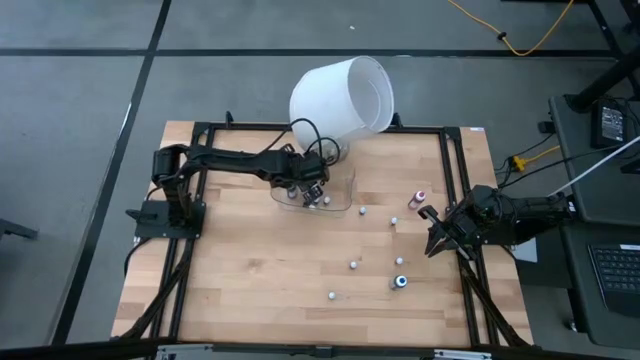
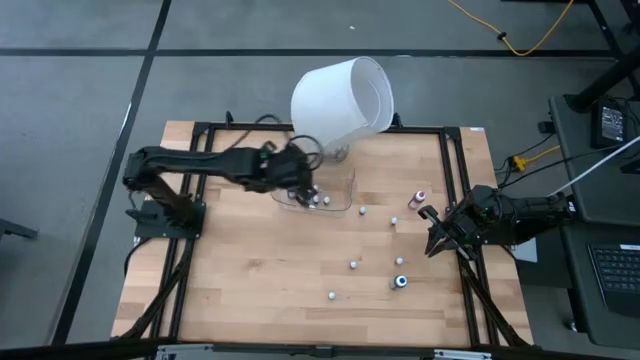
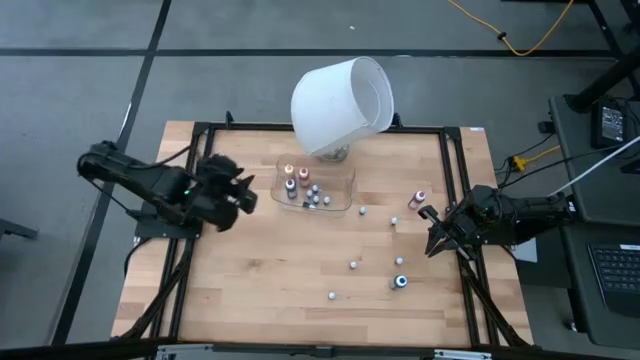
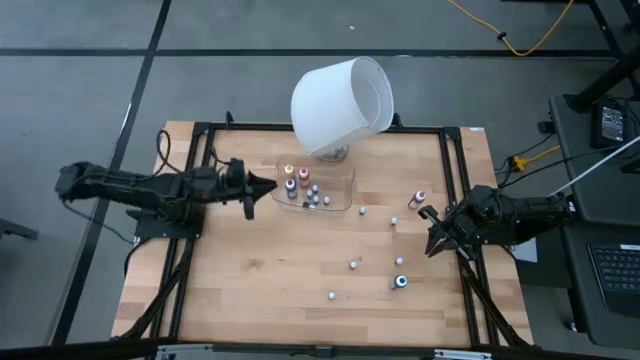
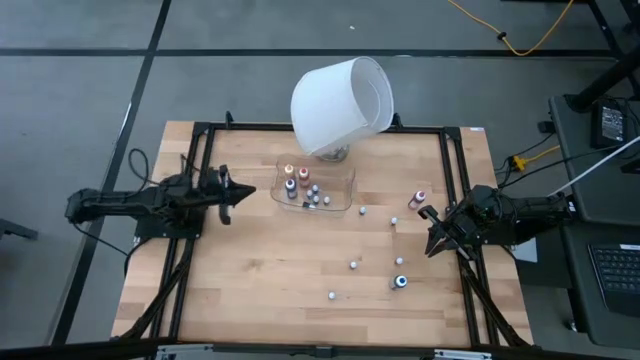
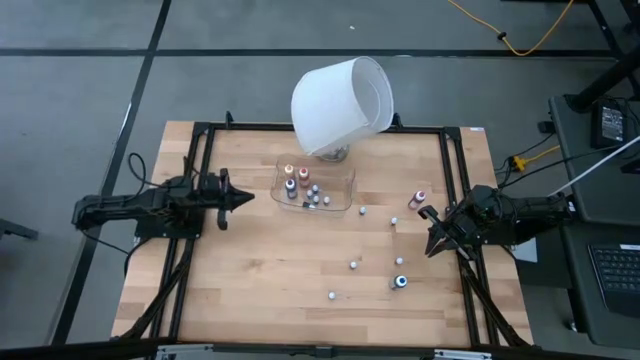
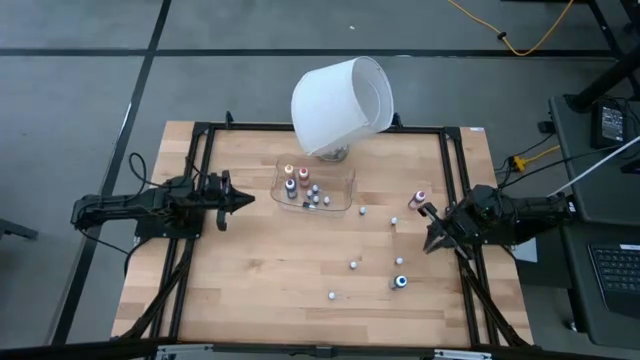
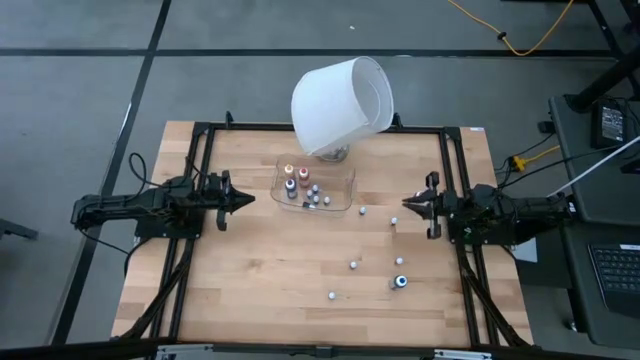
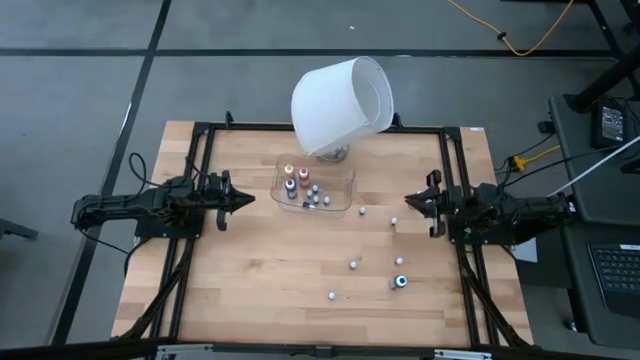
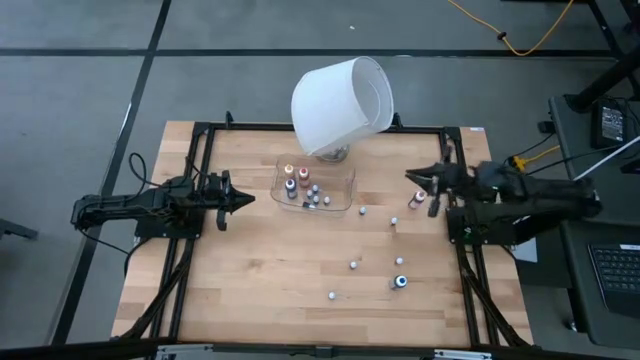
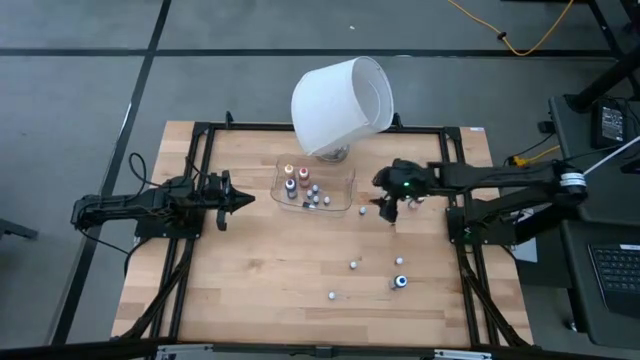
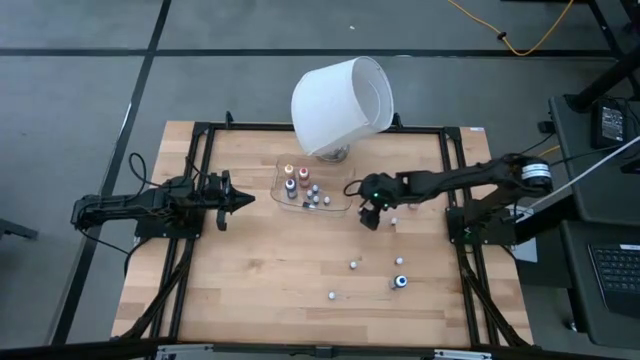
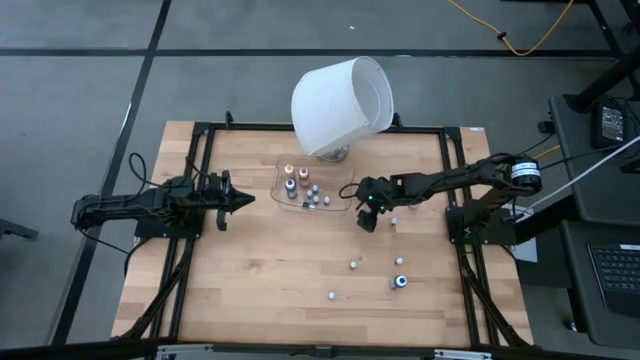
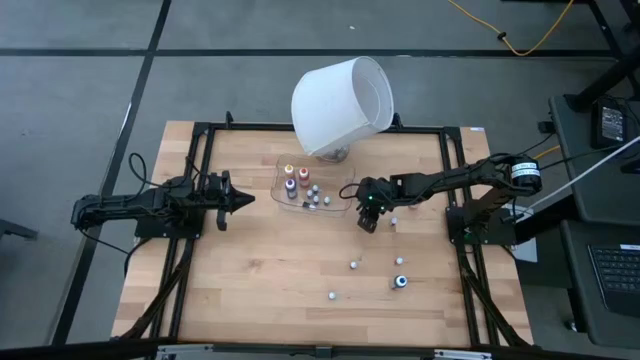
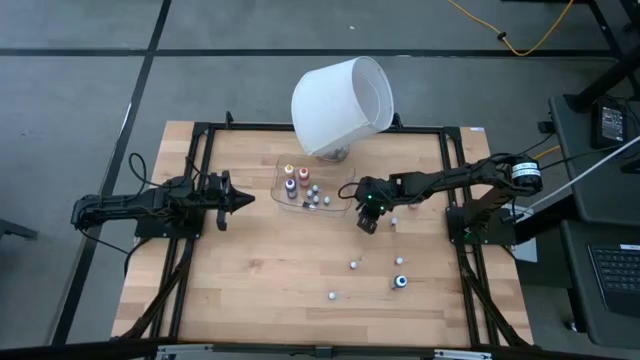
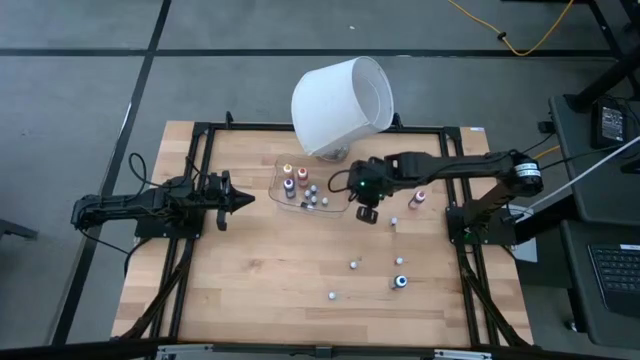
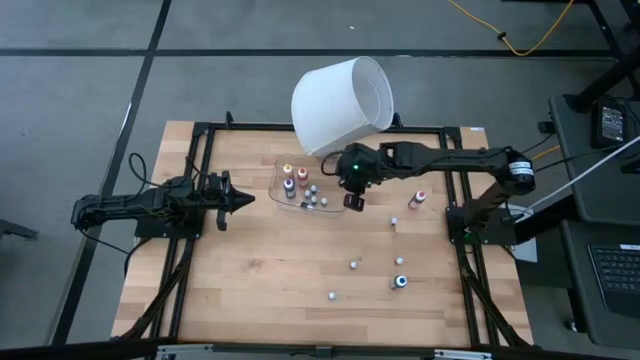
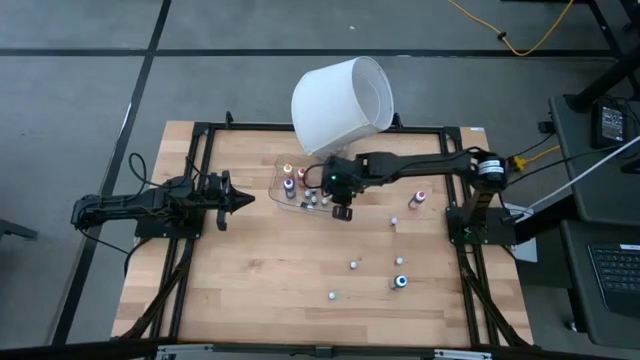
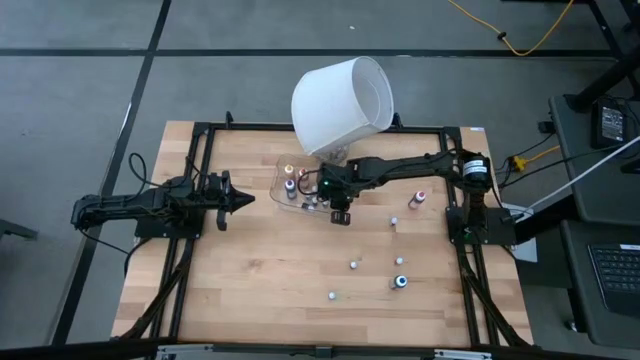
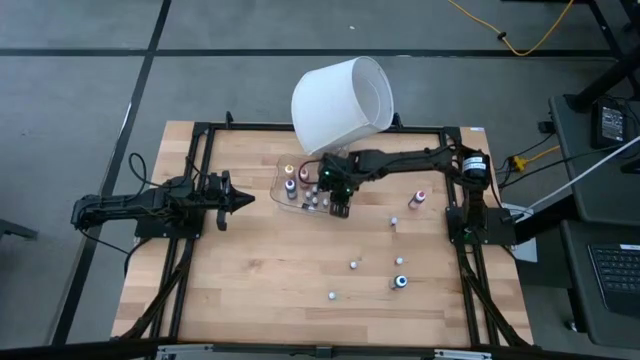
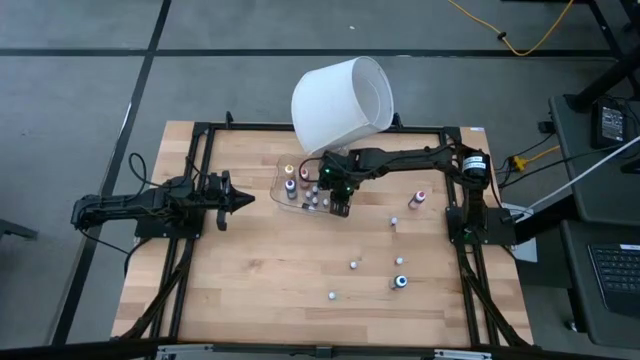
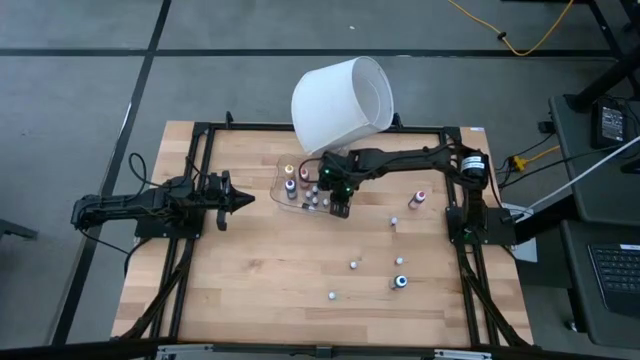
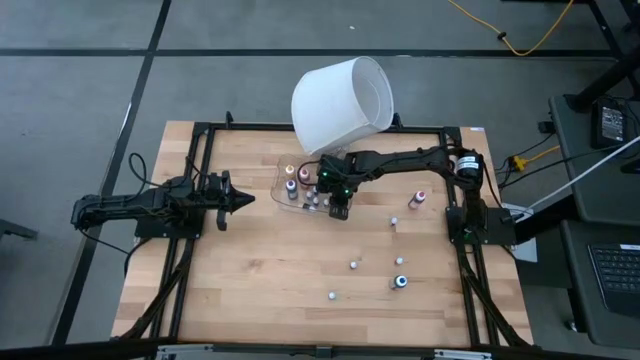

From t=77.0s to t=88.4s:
Task: Pick & Place food coloring
Put the small blue food coloring bottle into the container

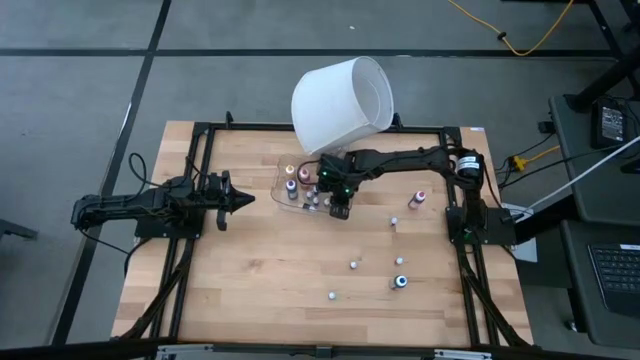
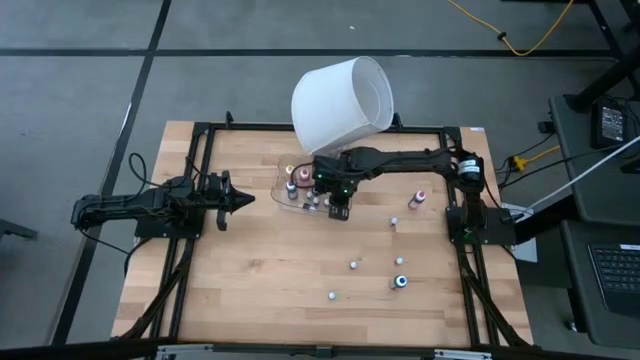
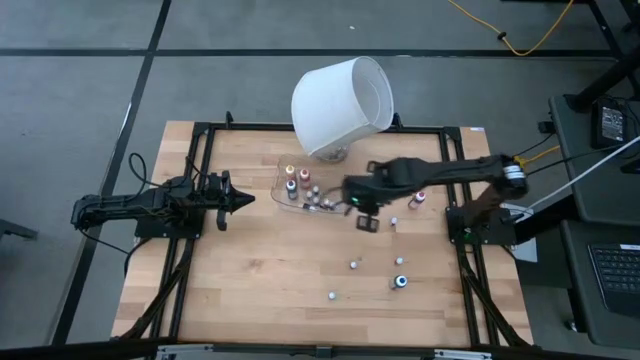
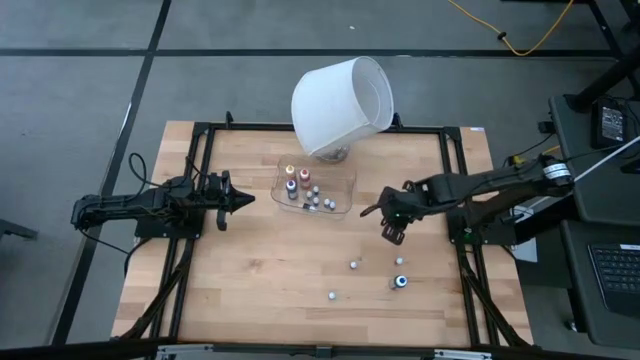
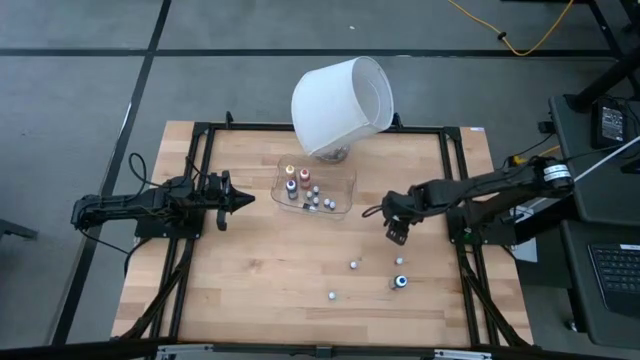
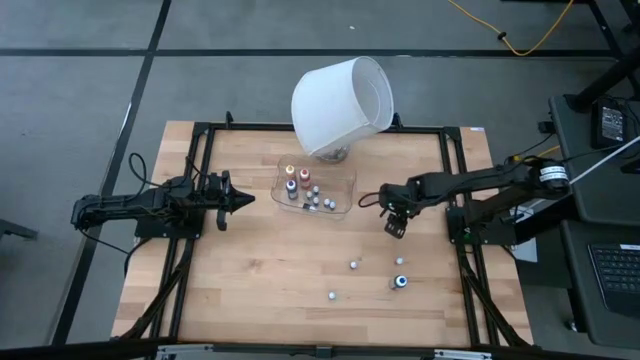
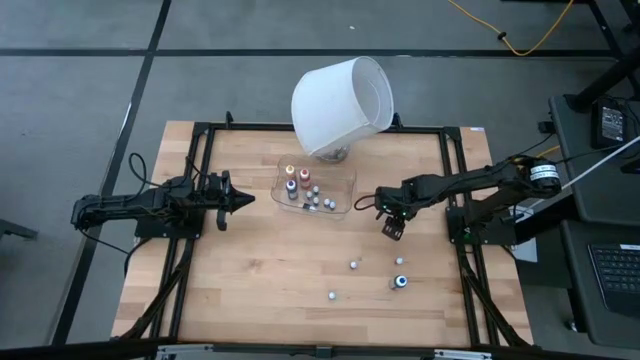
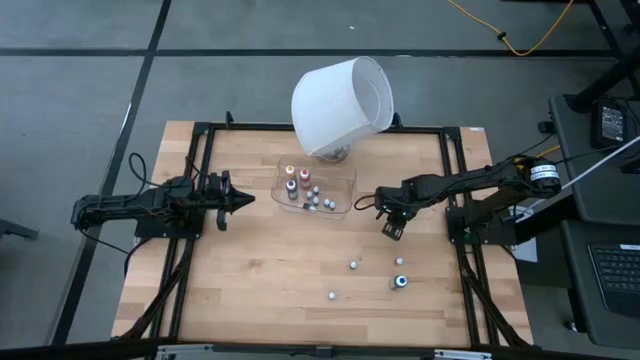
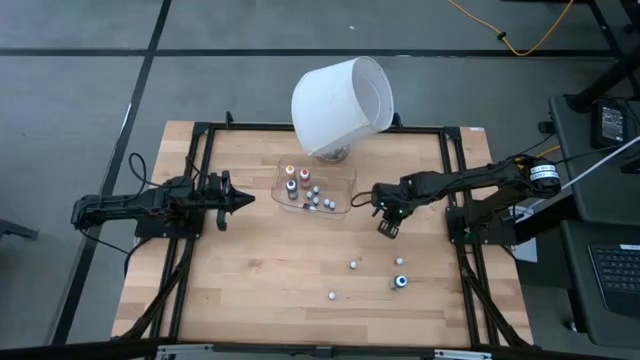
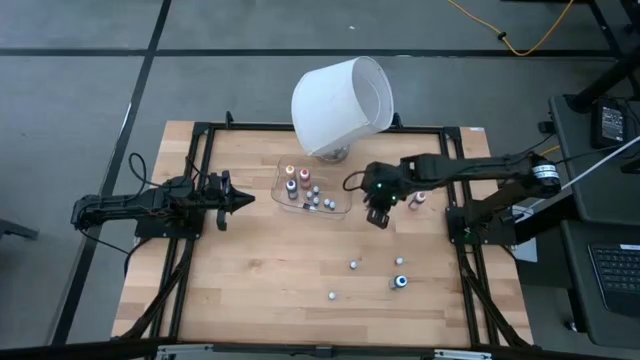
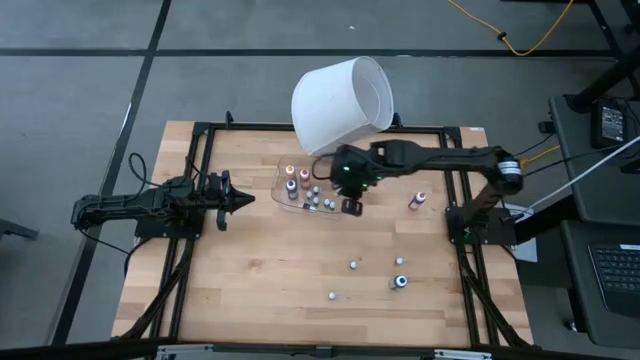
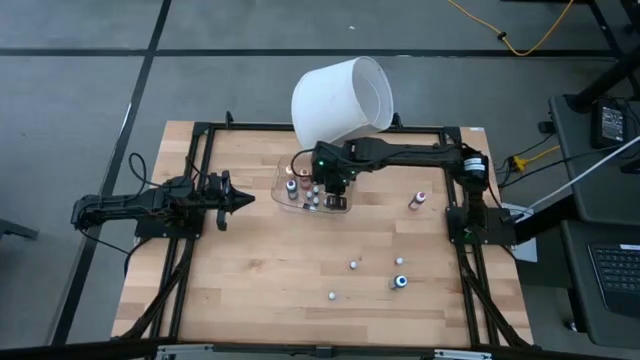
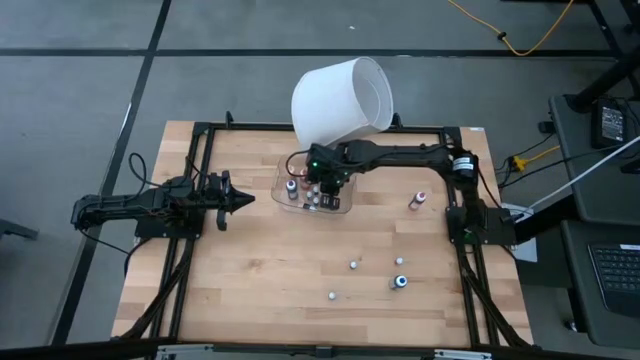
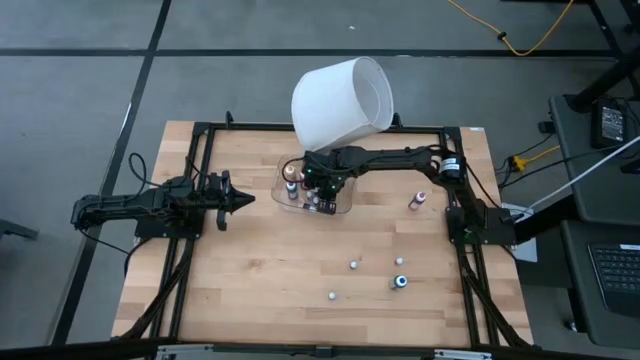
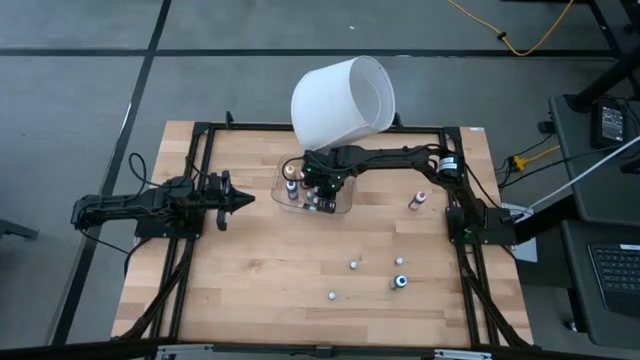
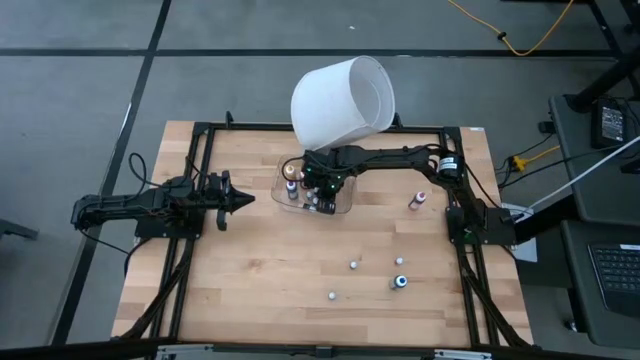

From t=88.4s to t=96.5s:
Put the small green food coloring bottle into the container

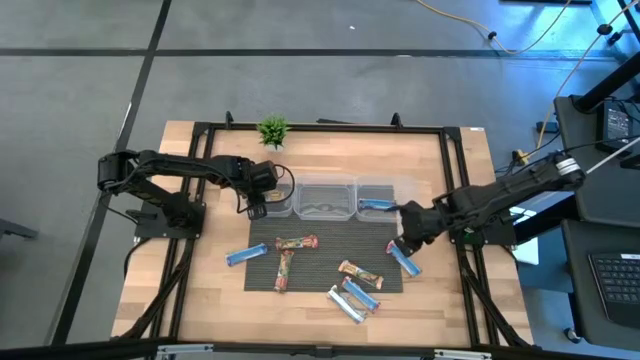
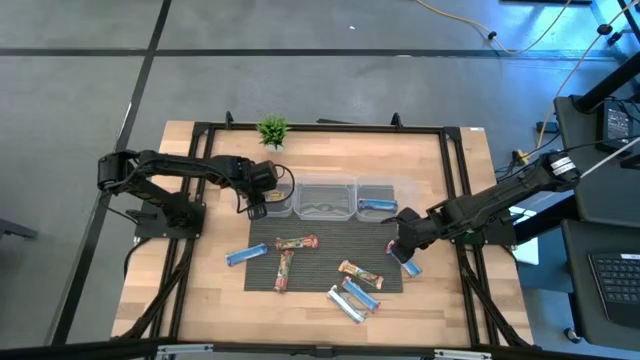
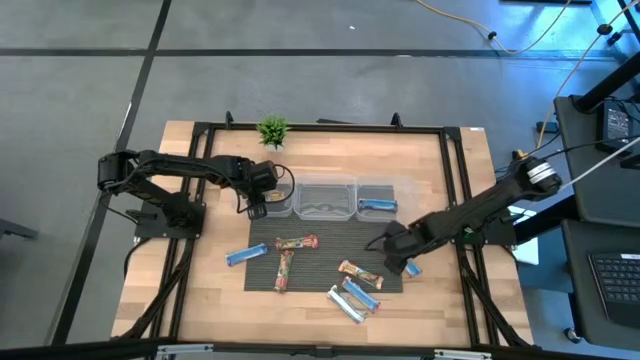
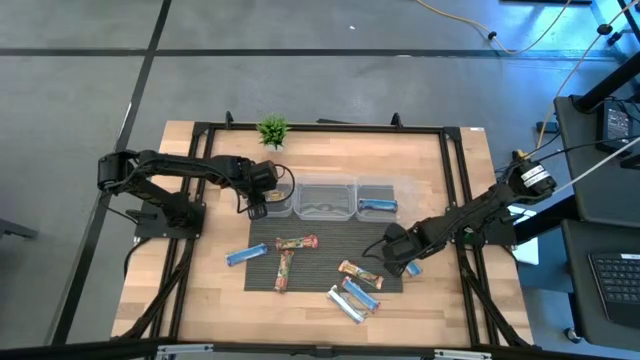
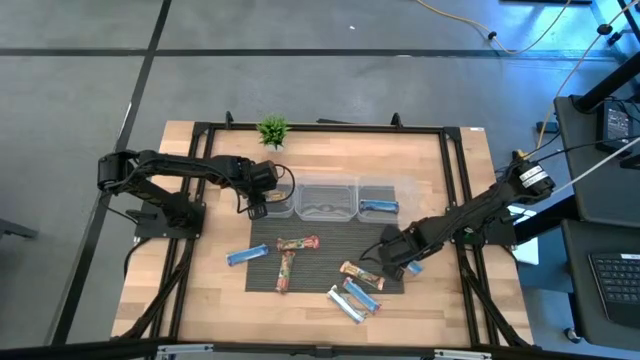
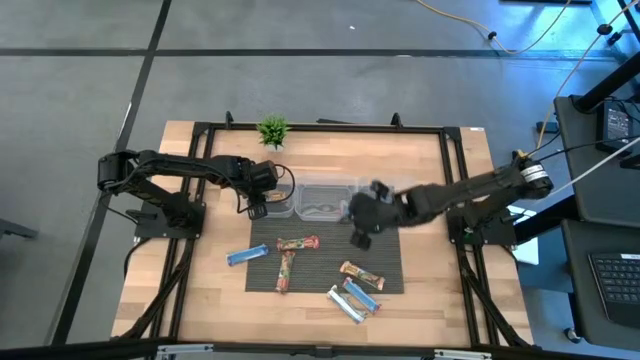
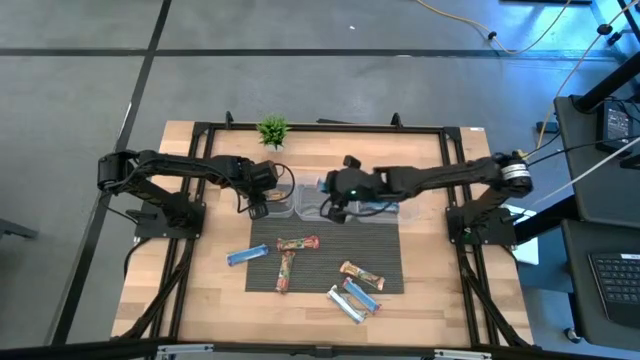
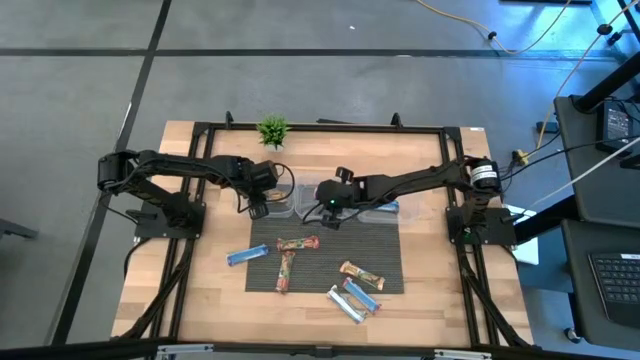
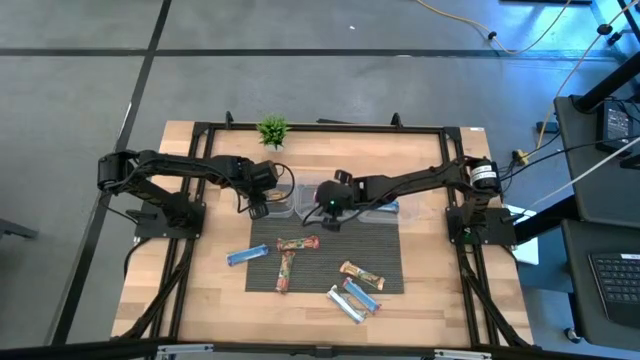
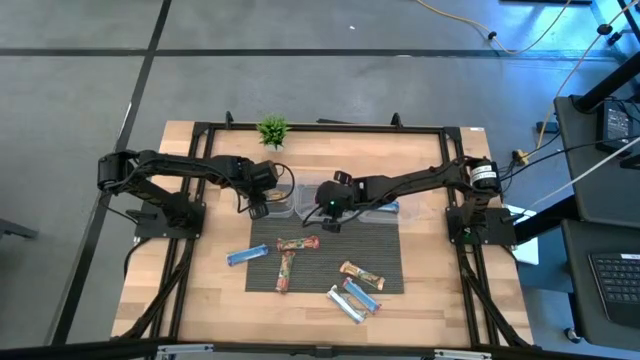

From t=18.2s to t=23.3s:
Task: Pick and place Granola Bars by type
Put the red granola bar into the center transparent bin
